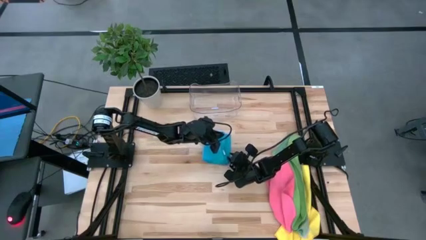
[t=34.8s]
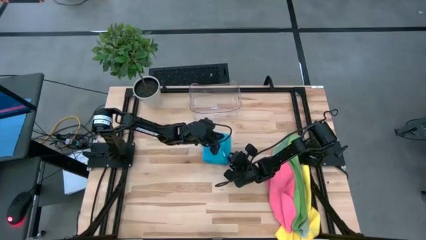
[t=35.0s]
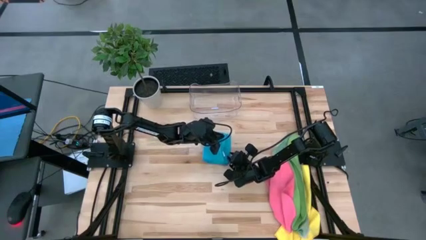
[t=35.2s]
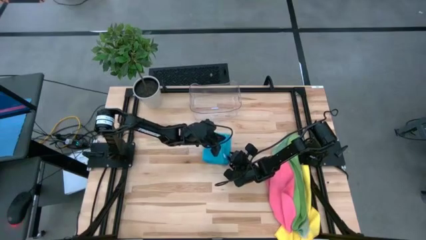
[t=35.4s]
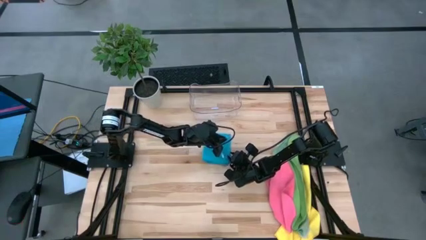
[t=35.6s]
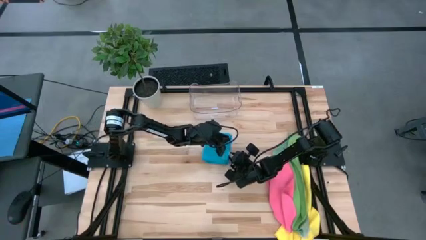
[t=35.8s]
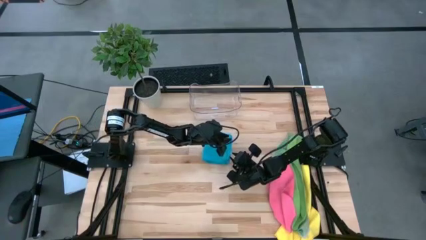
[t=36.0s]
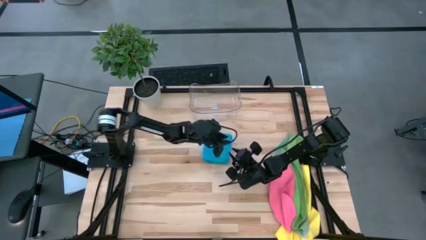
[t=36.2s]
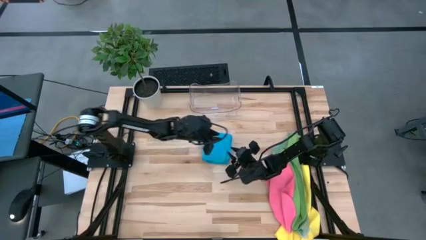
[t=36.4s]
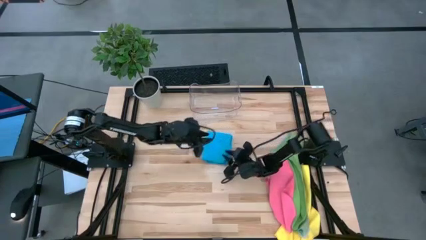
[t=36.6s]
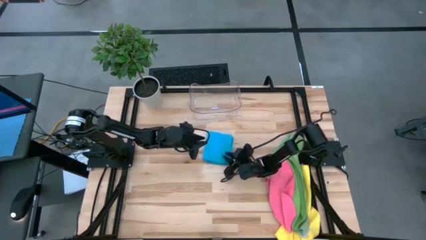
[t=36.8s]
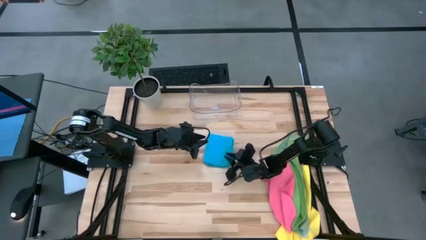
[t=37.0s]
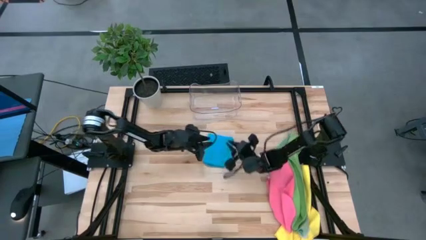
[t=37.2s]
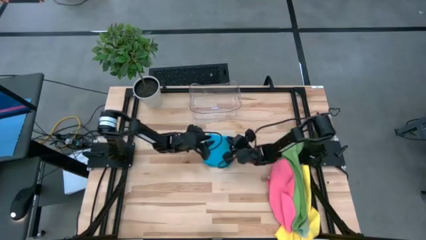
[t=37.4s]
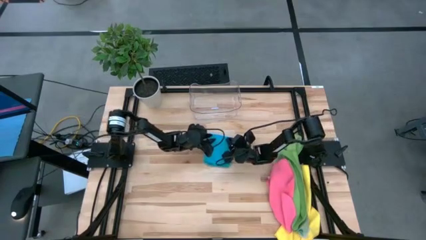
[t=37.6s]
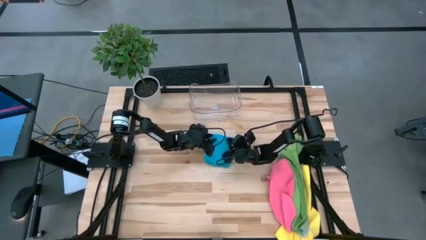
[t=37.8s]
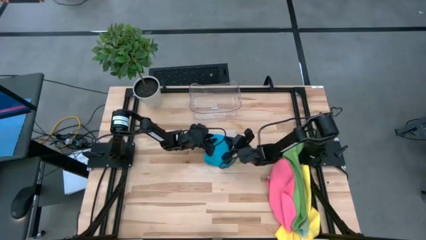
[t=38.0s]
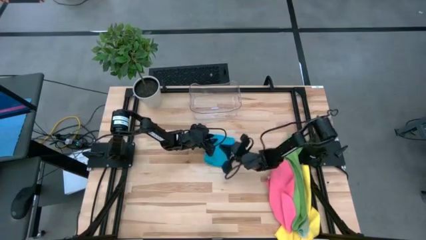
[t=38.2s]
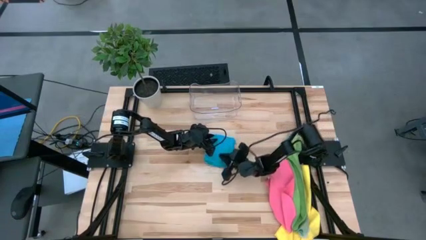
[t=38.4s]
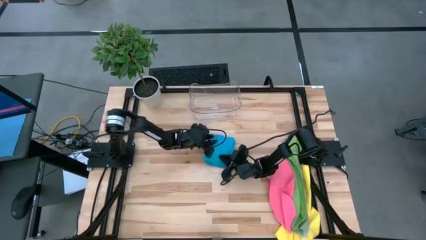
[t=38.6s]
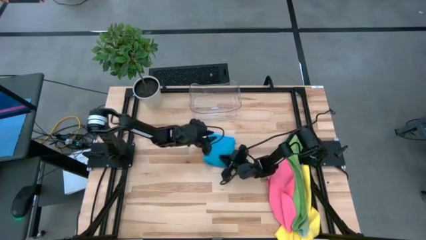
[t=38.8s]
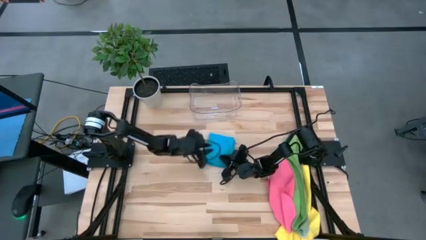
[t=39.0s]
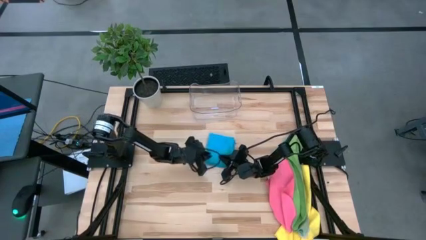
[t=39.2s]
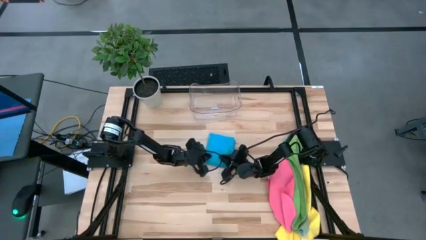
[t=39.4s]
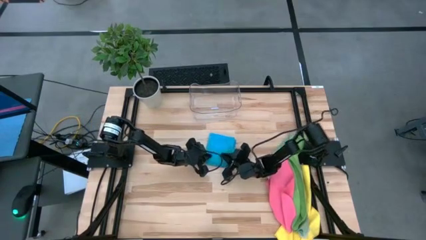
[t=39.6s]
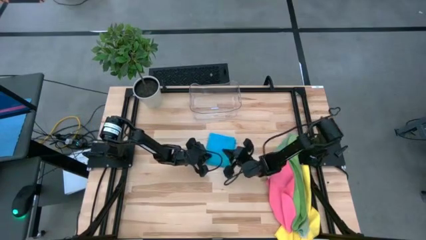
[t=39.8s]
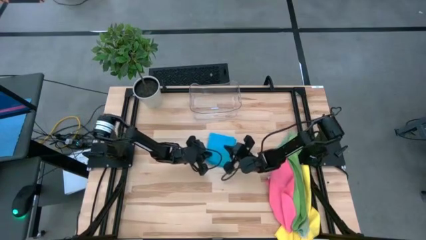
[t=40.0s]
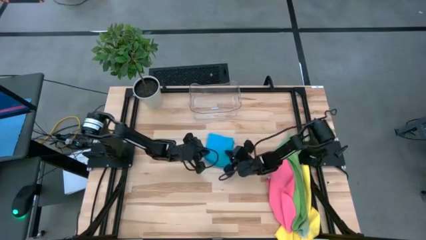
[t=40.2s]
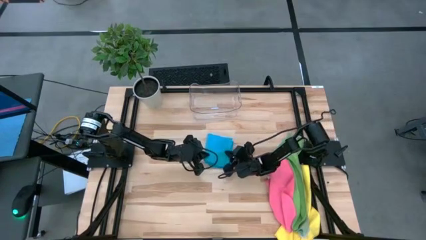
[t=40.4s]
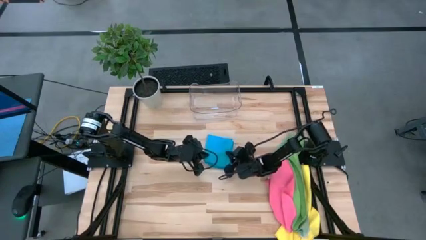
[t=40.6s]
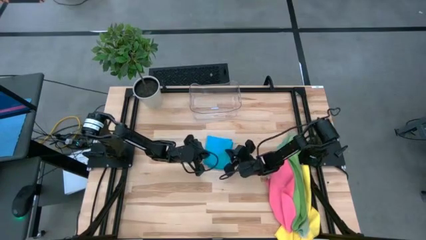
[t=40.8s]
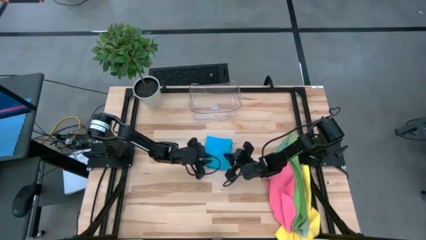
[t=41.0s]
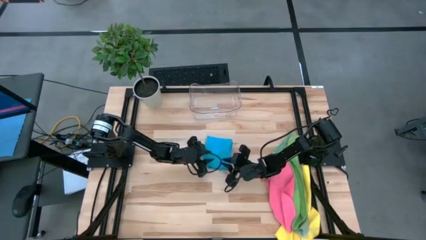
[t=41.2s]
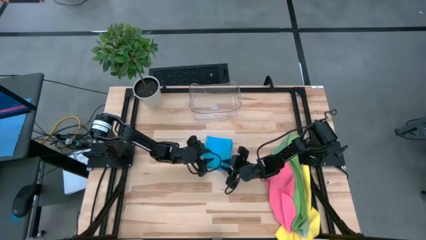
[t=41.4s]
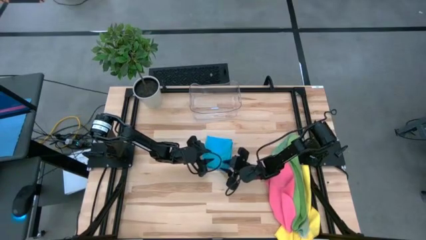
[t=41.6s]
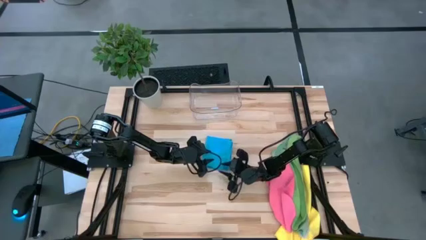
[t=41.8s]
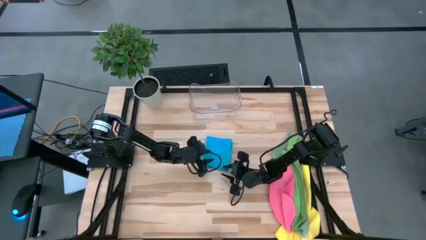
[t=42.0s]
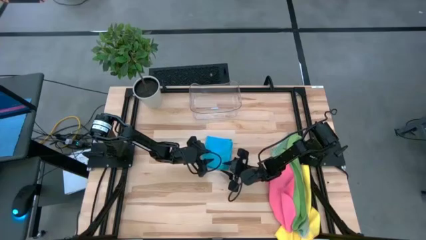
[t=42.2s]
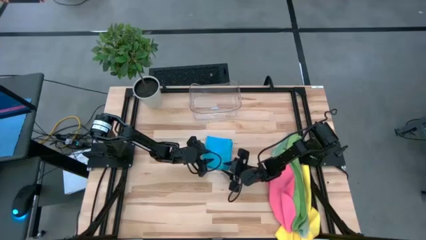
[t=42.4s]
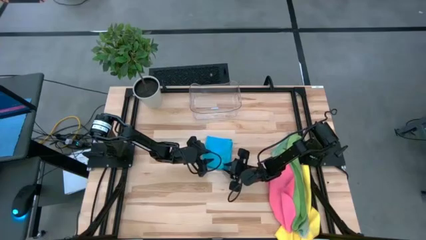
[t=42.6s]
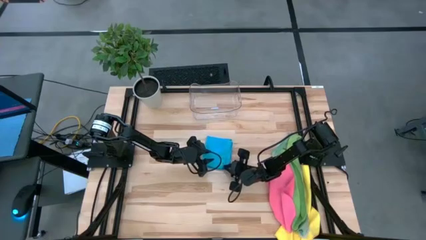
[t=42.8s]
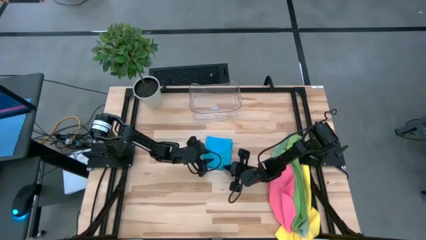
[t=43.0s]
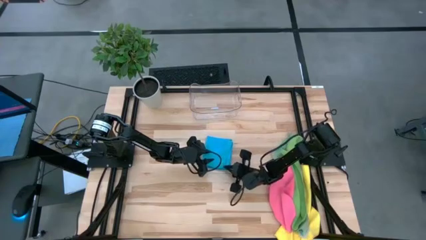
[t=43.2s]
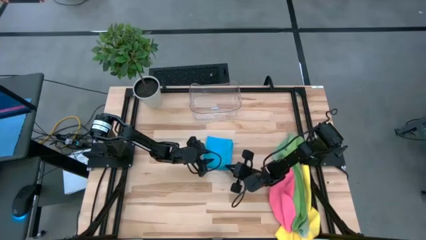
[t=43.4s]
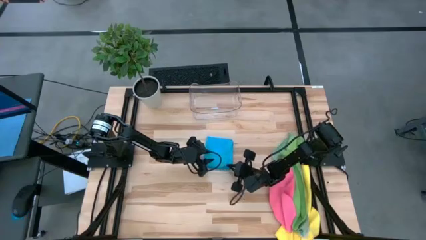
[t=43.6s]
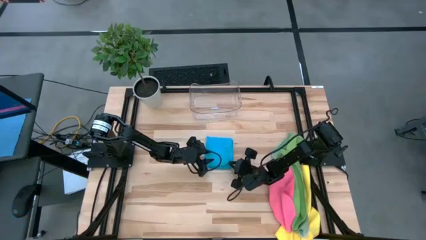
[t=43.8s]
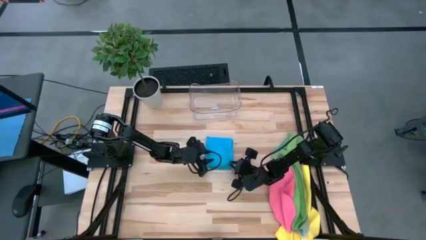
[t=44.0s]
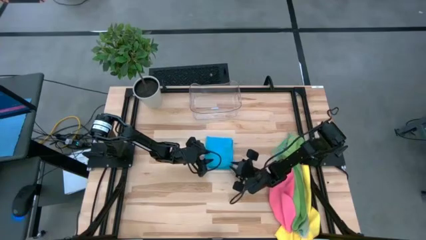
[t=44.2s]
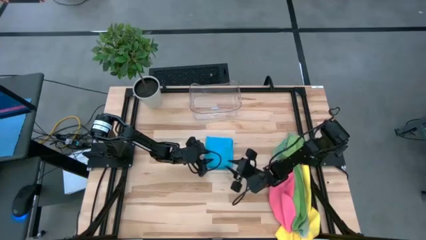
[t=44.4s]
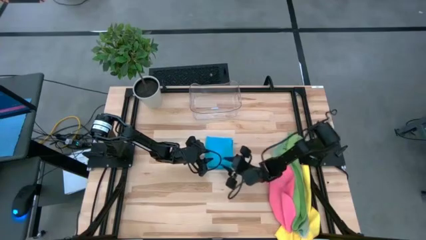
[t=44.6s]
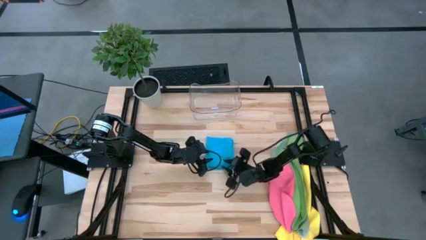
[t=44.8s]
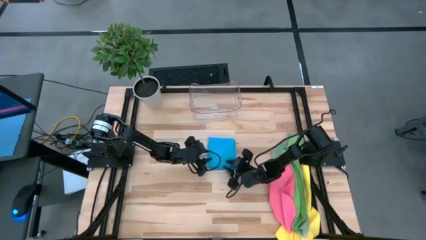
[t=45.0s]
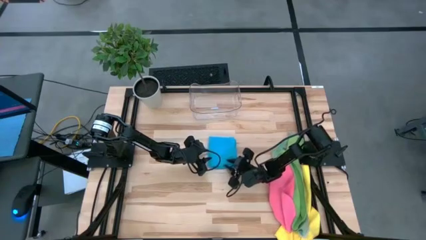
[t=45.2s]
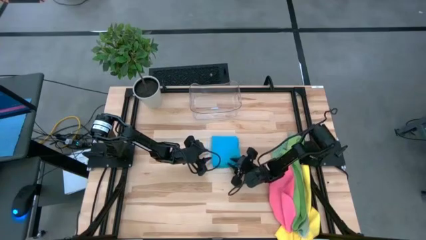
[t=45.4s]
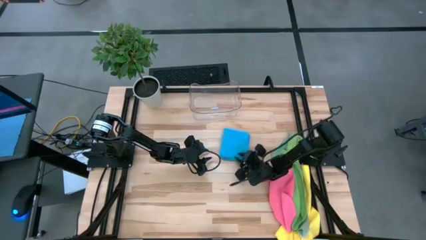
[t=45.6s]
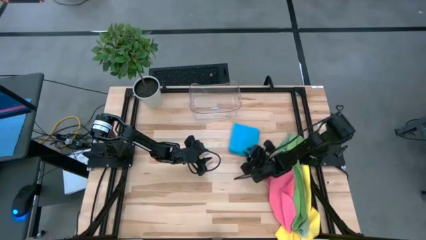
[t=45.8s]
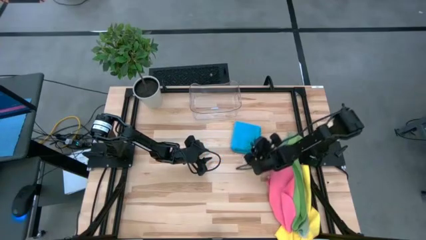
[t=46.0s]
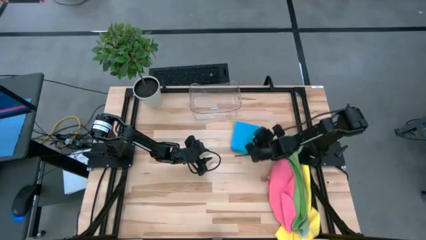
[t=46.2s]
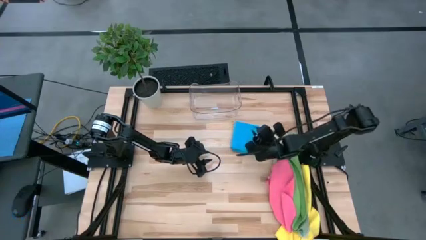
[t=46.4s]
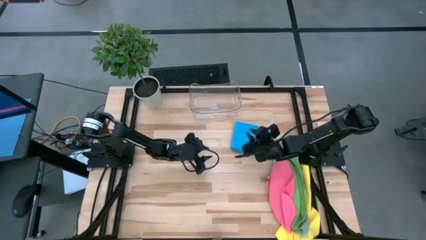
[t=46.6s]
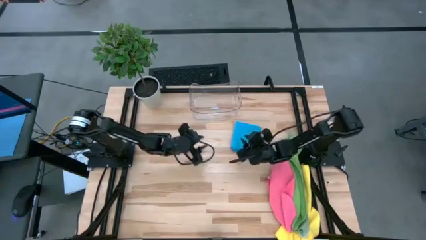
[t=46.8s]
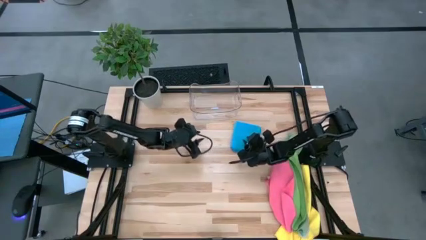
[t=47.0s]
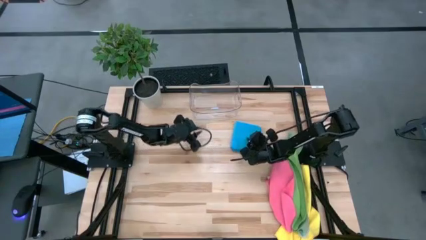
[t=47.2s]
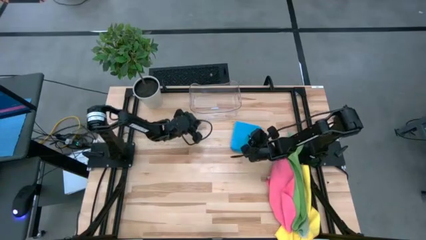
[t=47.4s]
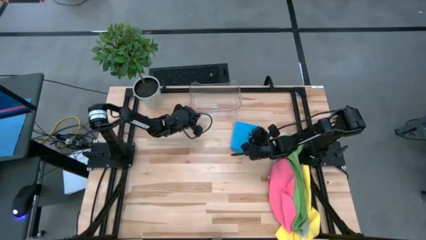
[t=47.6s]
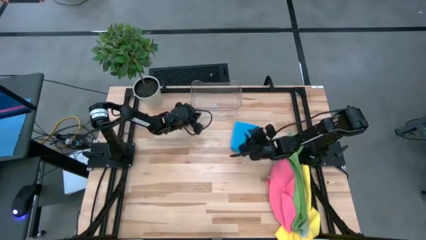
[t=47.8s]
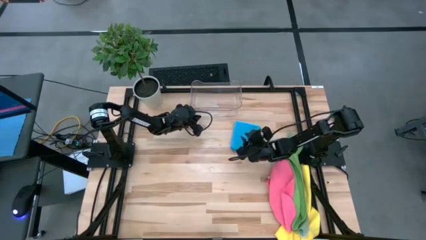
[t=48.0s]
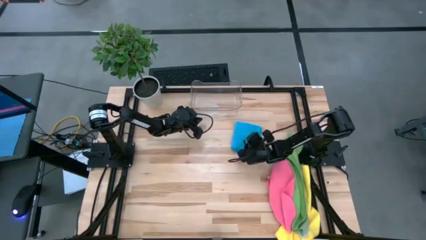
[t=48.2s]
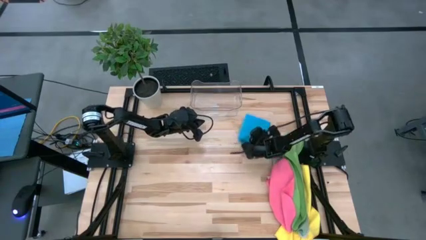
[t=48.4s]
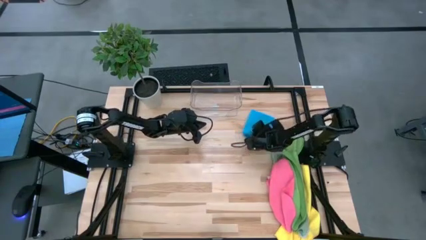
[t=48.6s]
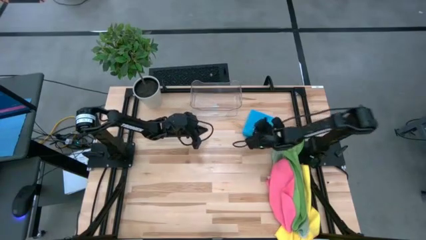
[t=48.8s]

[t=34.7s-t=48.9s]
Task: Fold microfiber towels
Fold the blue microfiber towel

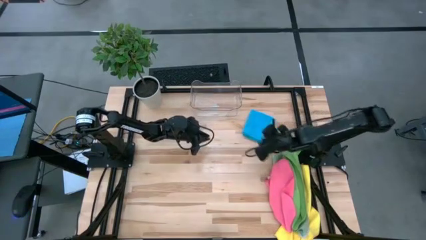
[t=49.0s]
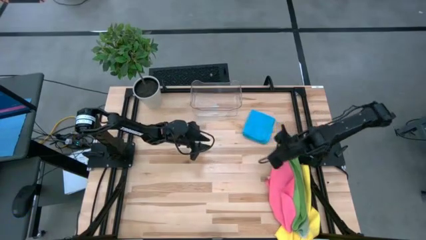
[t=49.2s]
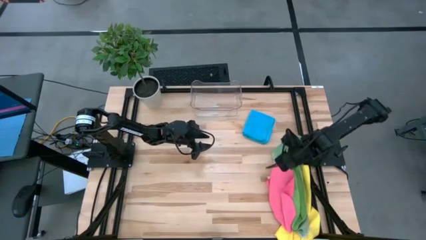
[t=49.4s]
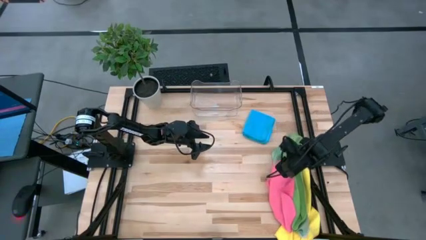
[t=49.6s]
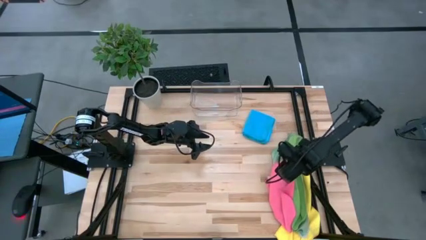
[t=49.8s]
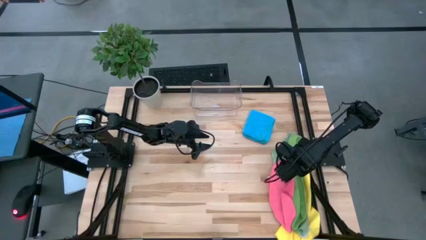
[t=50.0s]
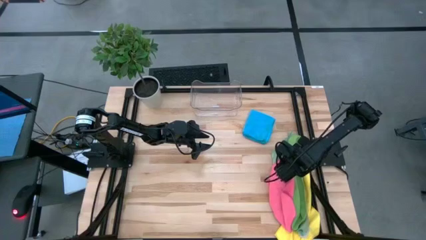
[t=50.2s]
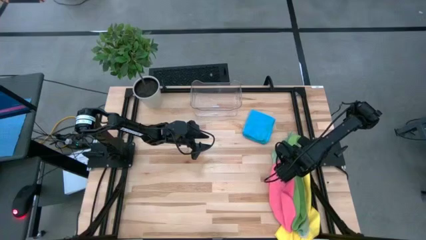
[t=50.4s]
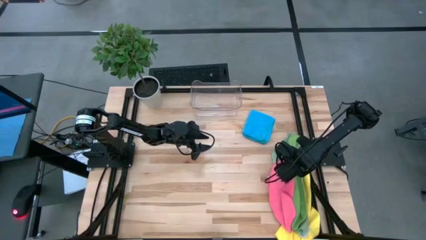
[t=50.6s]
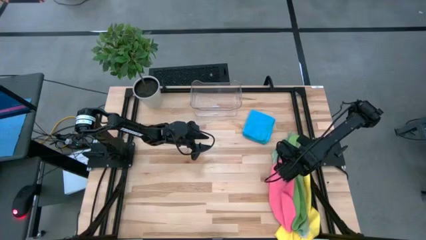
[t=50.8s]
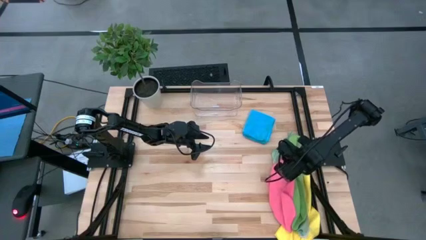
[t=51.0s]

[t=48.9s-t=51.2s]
Fold the green microfiber towel
